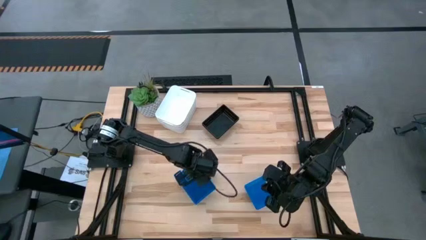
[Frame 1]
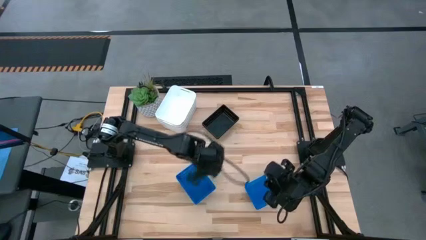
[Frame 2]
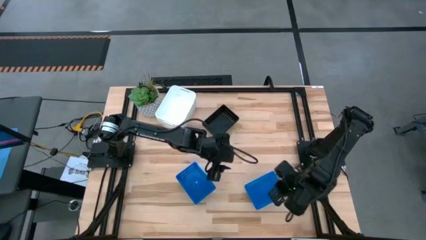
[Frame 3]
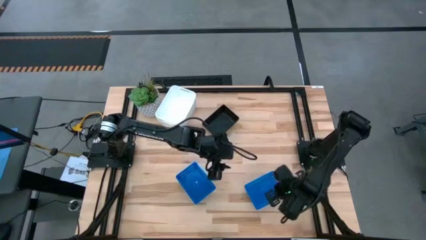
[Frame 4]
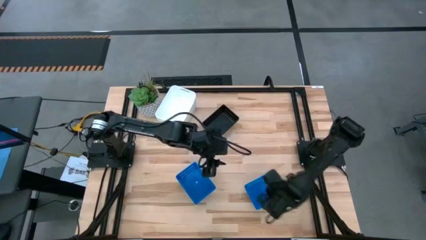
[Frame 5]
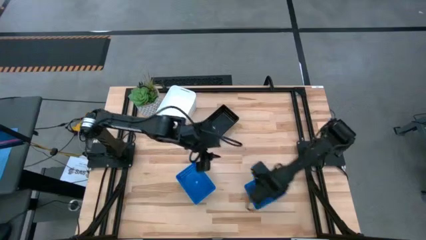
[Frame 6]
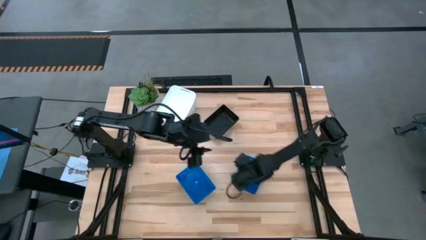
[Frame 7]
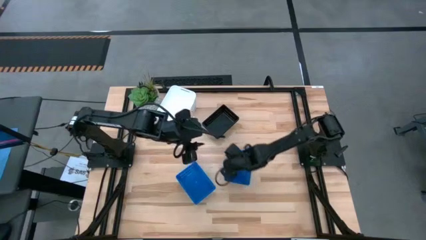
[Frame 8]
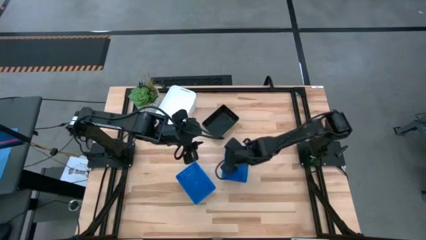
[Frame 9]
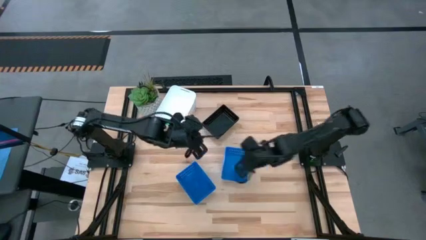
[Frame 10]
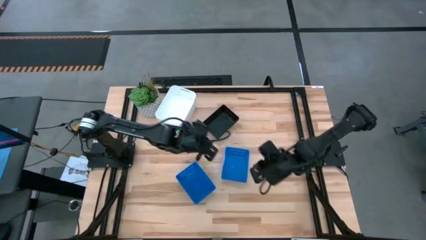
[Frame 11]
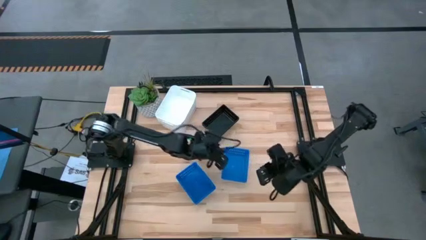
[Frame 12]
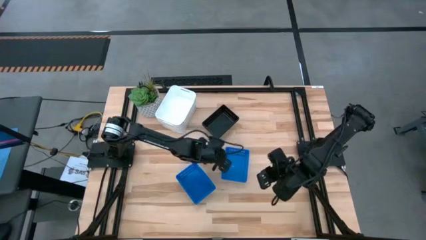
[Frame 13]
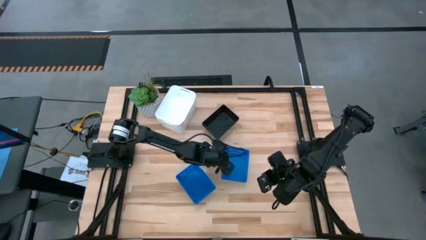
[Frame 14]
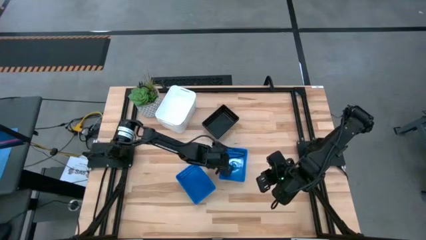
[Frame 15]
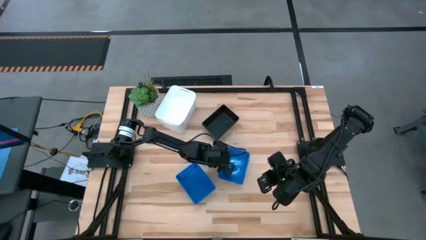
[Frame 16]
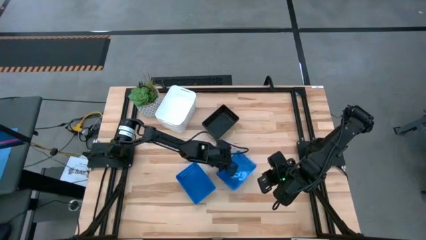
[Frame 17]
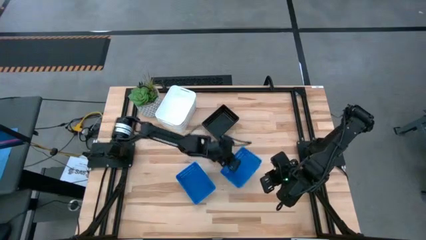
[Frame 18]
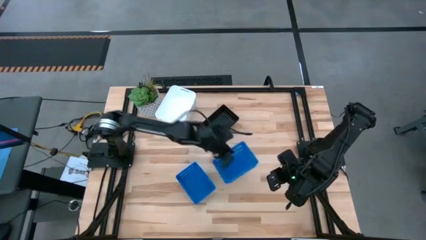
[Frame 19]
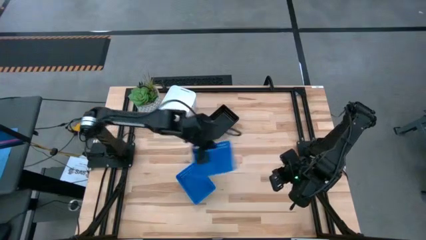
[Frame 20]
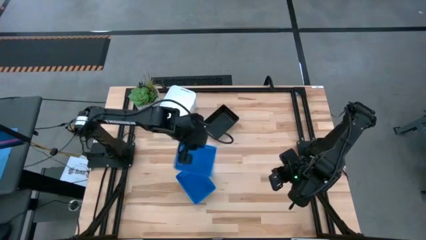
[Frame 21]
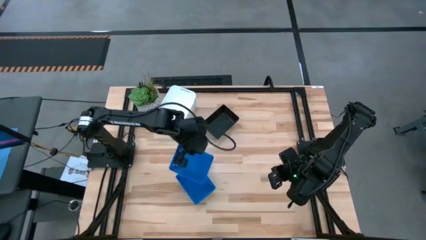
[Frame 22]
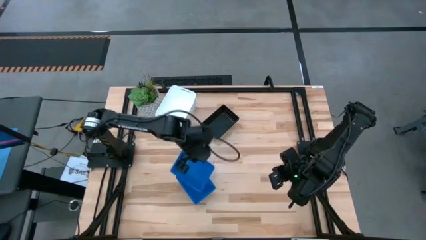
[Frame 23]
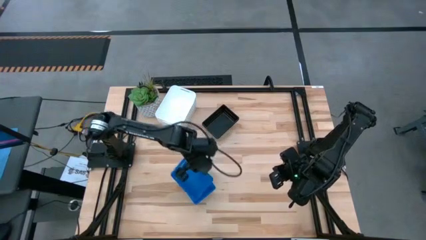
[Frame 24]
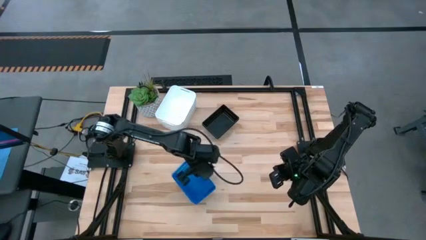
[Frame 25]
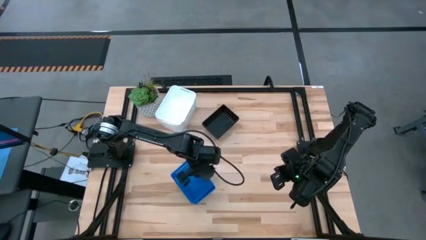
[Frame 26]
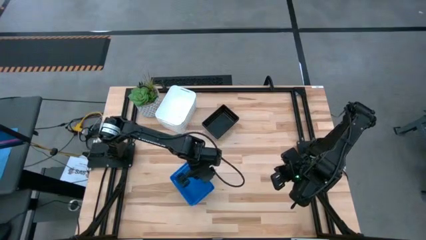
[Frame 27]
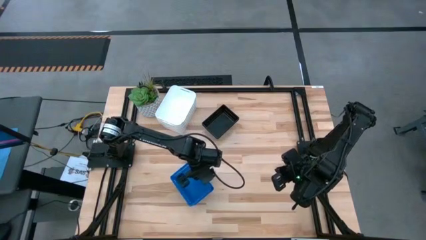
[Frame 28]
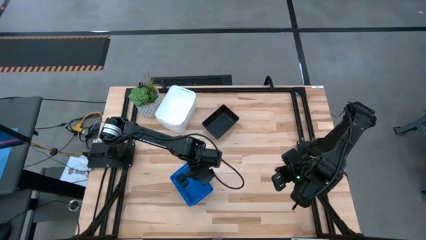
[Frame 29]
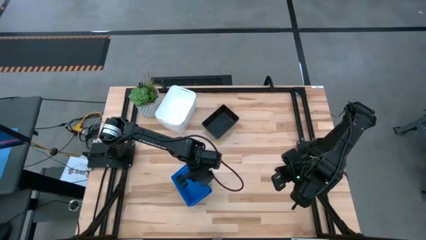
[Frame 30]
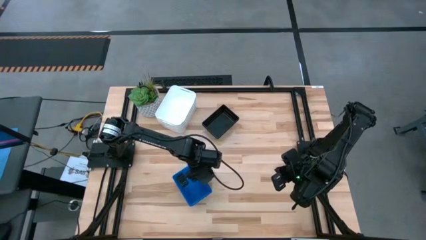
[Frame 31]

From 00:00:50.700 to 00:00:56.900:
Stack the blue bin on the blue bins

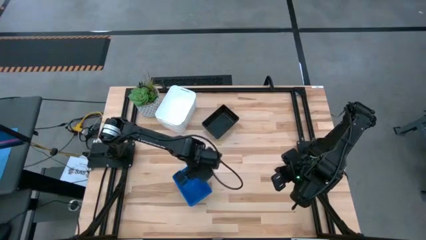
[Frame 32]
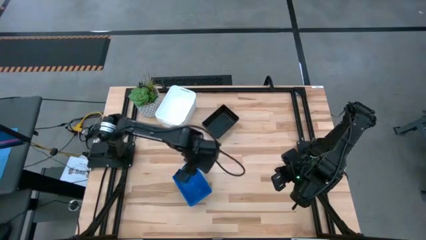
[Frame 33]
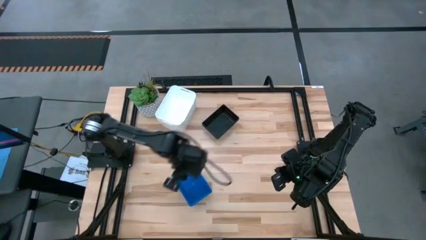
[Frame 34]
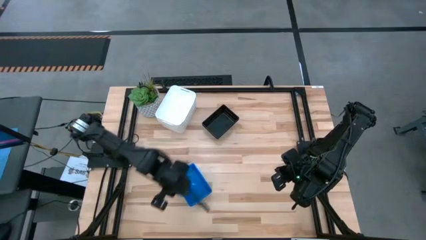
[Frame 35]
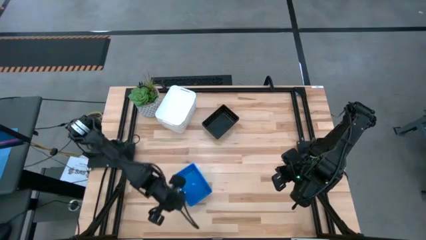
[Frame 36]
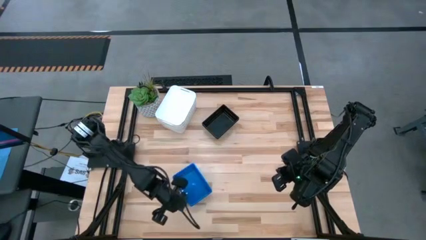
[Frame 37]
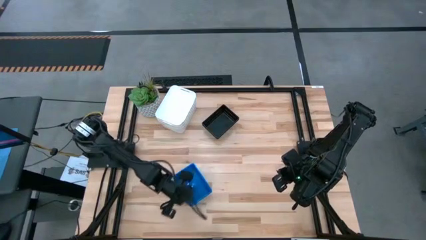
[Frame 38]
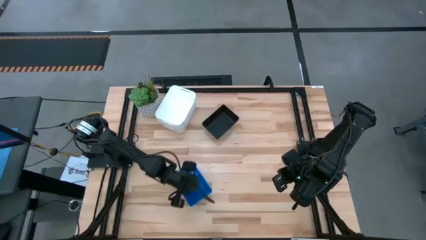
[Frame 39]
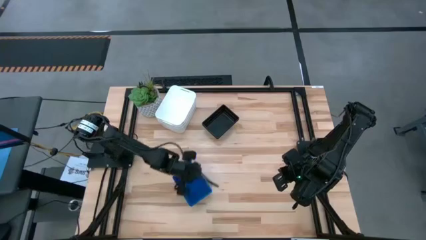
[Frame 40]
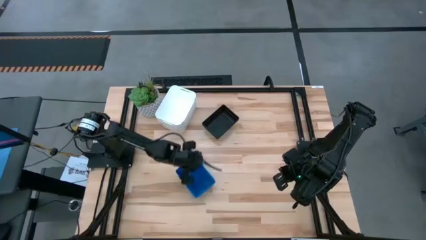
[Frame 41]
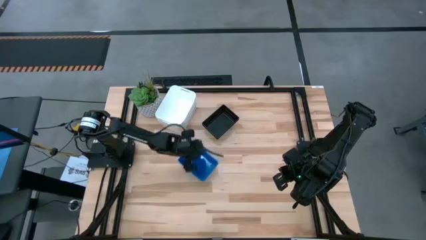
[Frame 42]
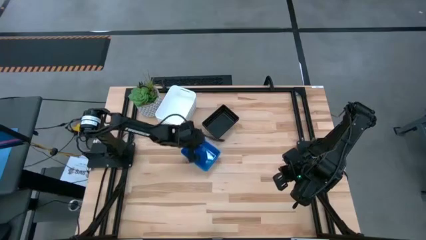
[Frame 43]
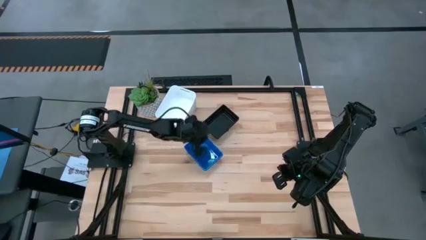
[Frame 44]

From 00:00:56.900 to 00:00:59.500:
Move the stacked blue bins to the center of the table

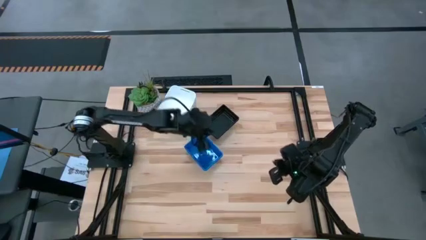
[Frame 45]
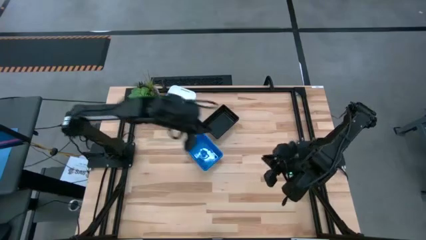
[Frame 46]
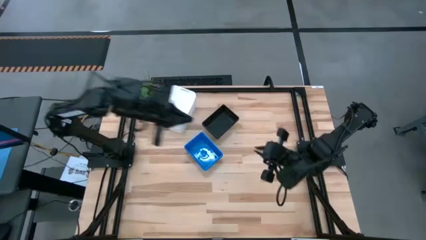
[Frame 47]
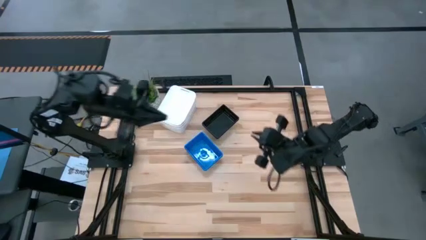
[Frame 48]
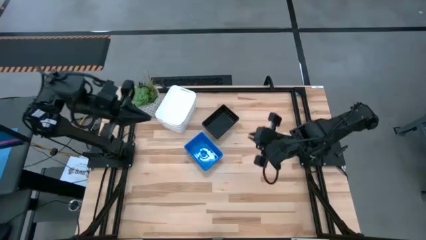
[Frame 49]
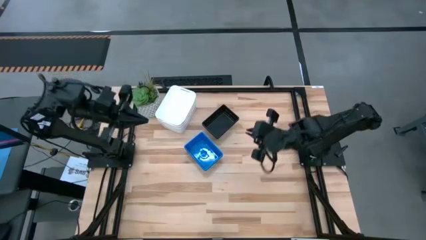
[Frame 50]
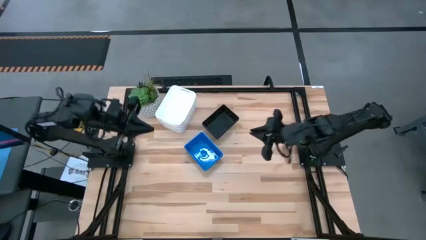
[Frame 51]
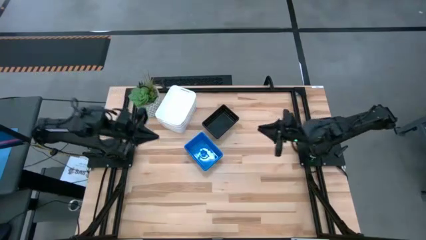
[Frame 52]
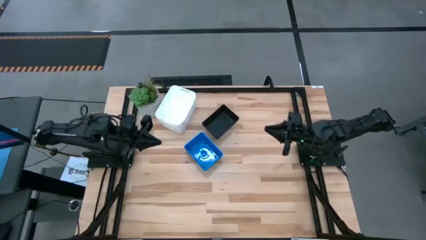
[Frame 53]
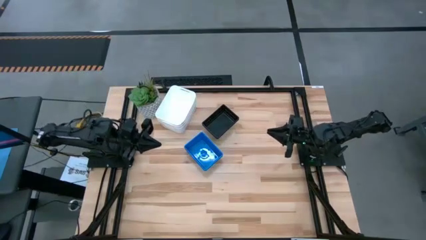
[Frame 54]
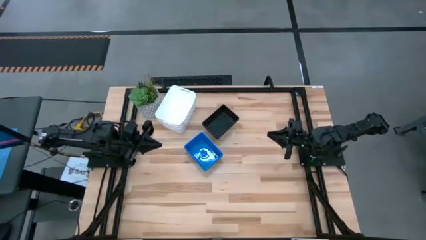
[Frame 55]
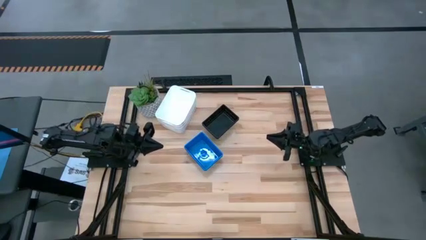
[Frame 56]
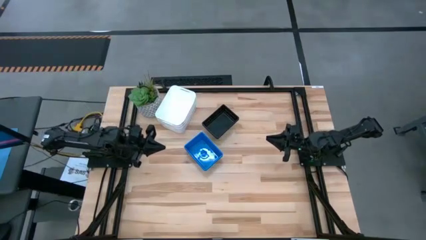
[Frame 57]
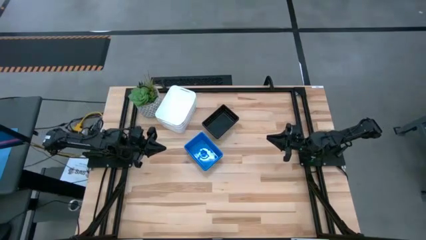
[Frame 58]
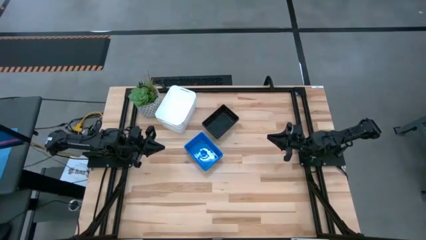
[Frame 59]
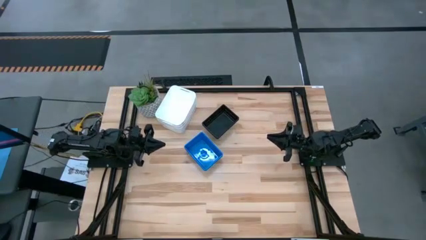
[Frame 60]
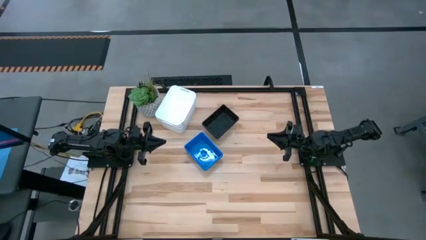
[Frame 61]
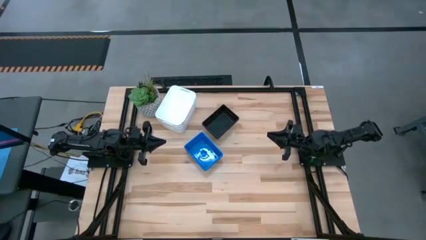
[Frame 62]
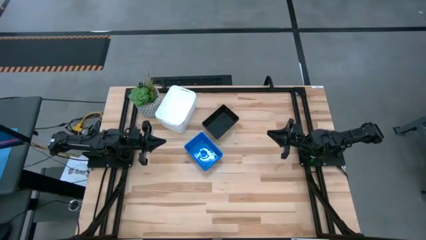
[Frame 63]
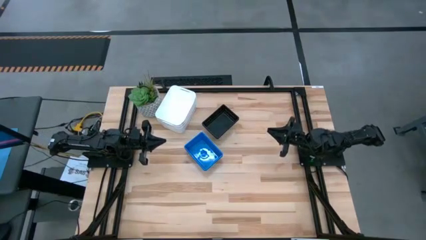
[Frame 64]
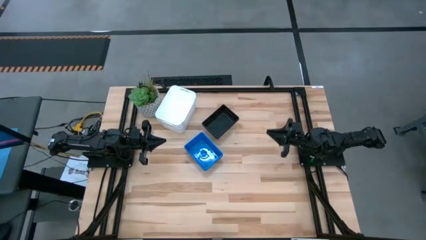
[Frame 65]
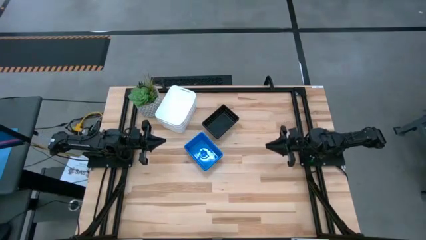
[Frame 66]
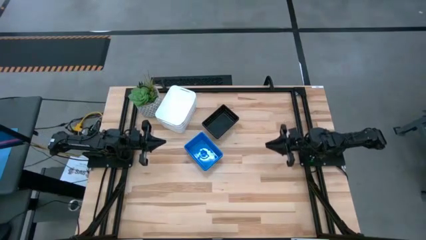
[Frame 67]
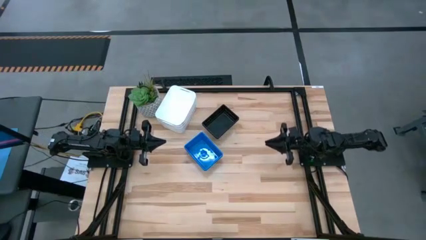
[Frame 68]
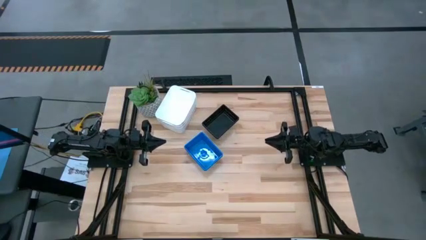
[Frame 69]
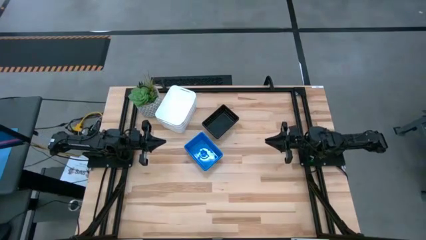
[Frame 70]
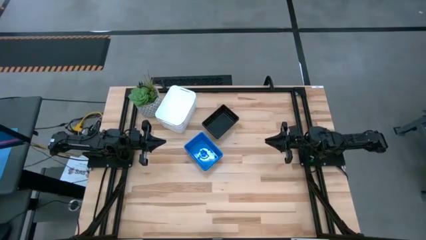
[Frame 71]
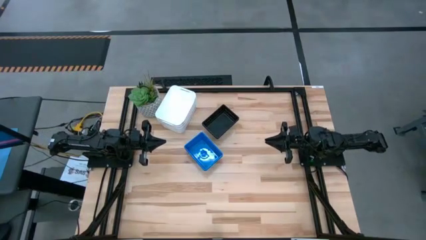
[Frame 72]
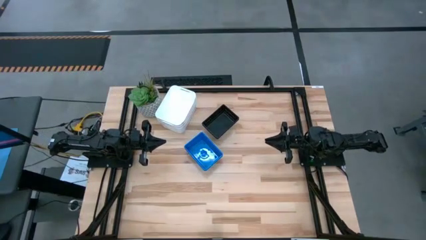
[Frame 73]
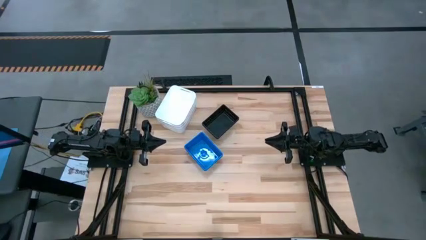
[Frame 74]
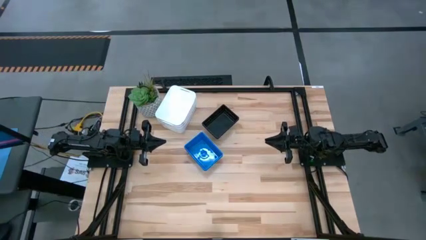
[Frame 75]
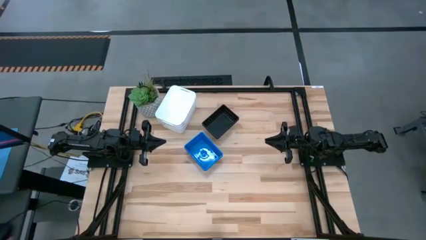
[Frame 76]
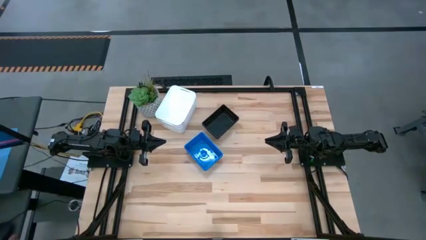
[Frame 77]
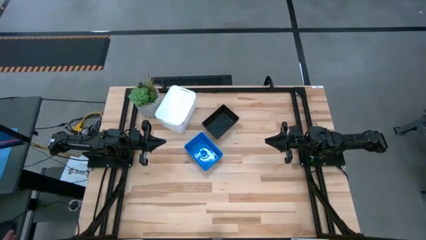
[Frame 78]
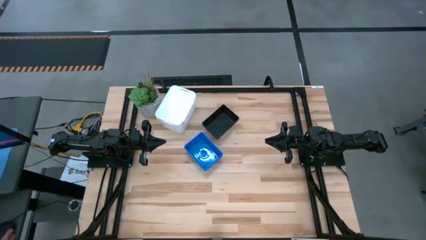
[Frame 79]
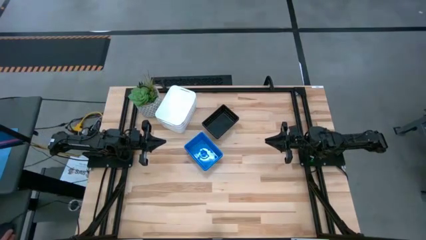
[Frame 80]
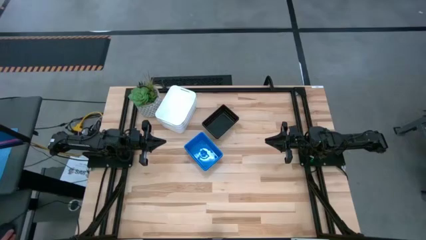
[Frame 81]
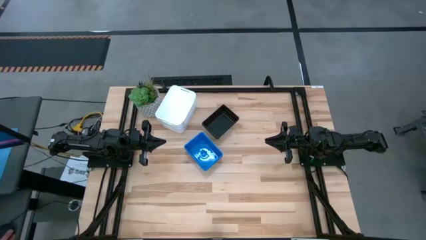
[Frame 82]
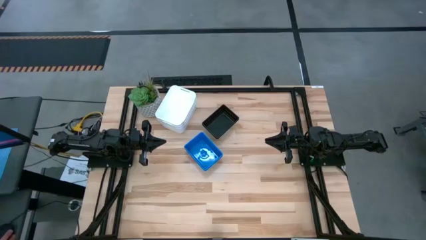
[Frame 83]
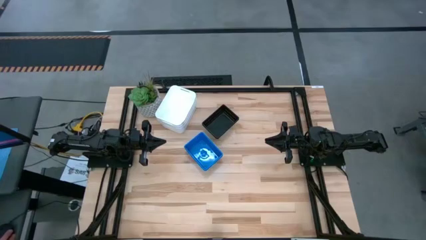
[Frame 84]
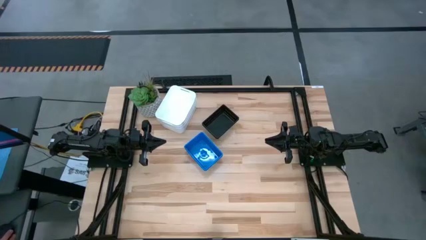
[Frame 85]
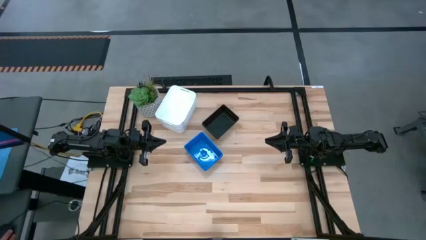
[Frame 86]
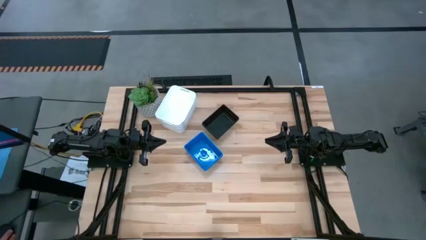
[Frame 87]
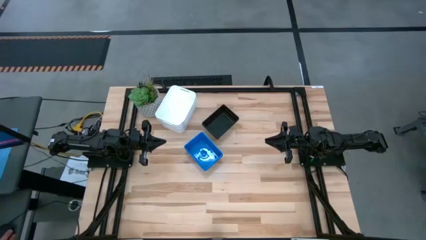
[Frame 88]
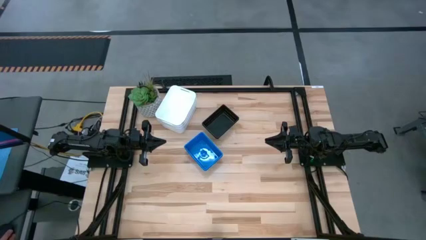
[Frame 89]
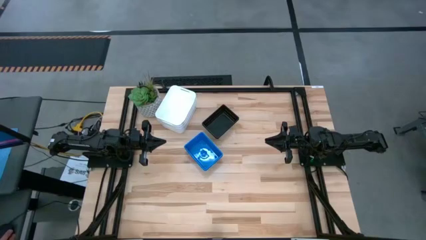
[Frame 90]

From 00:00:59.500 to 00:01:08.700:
Return to Home Position
